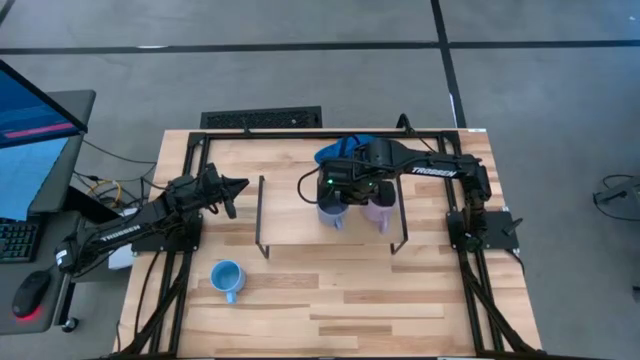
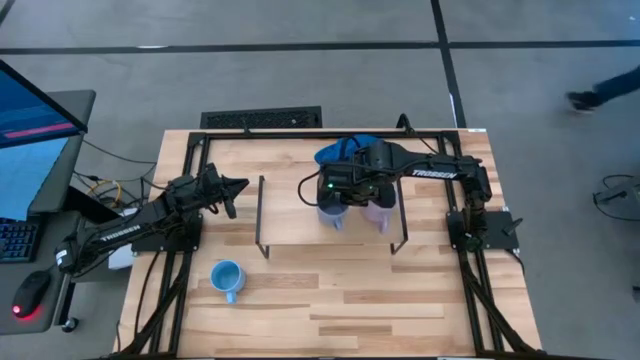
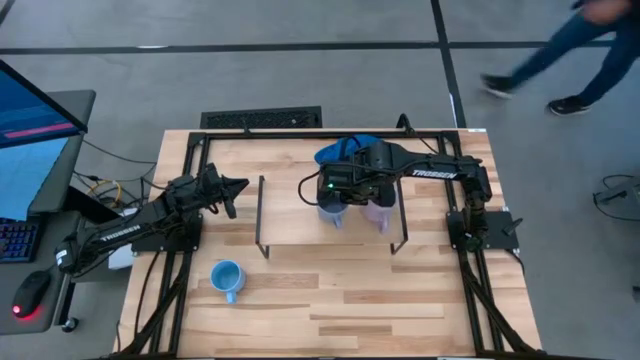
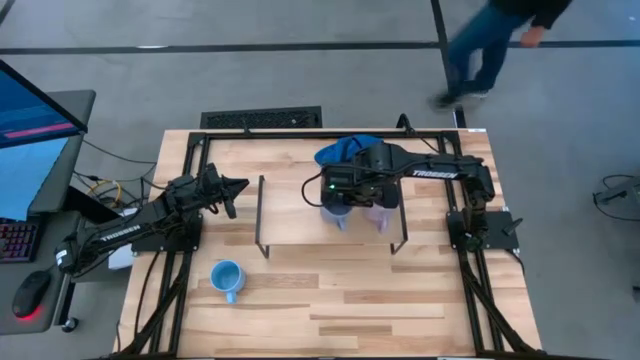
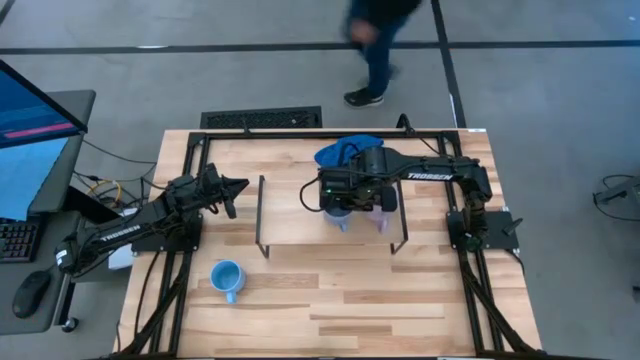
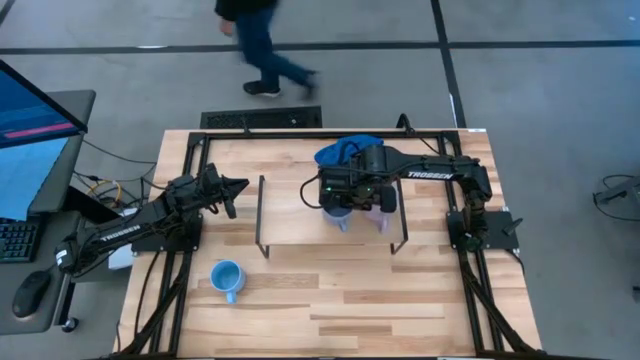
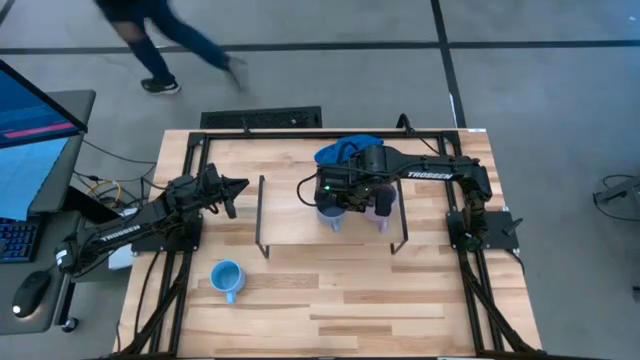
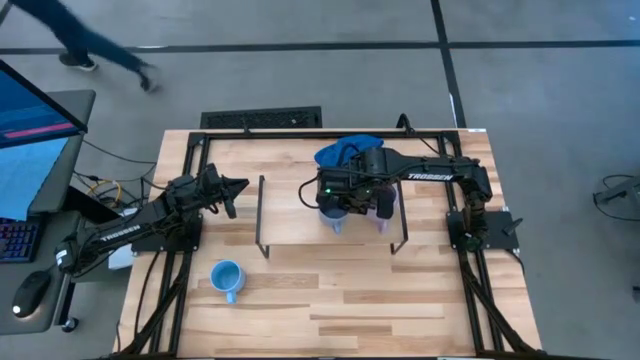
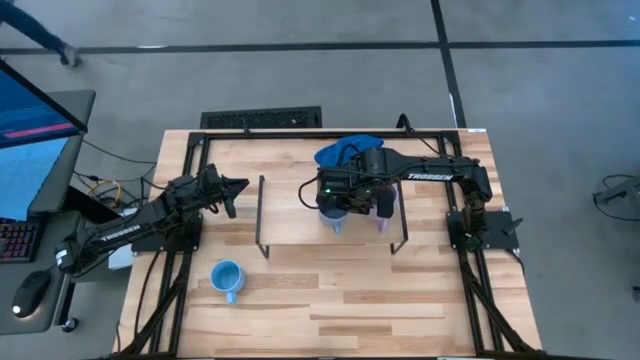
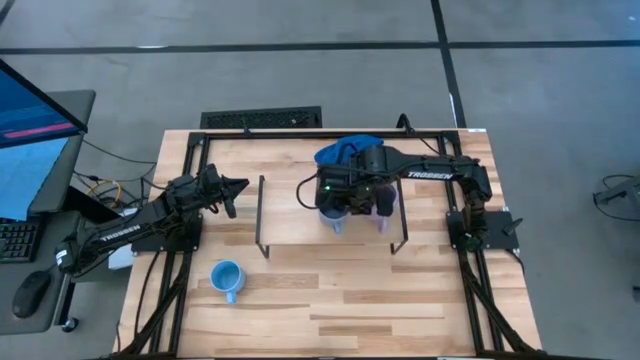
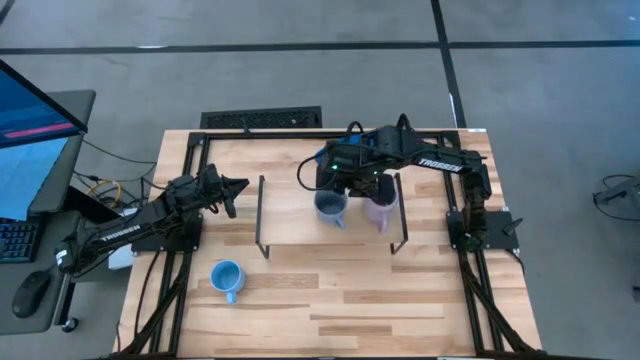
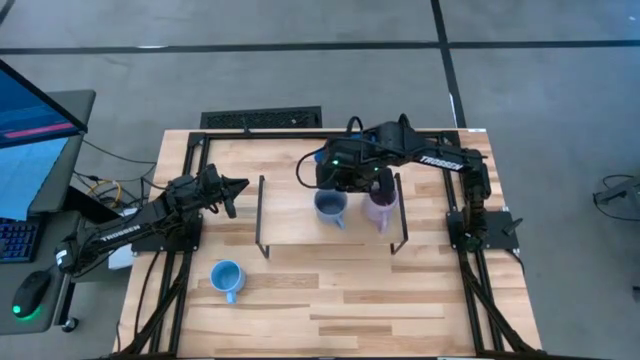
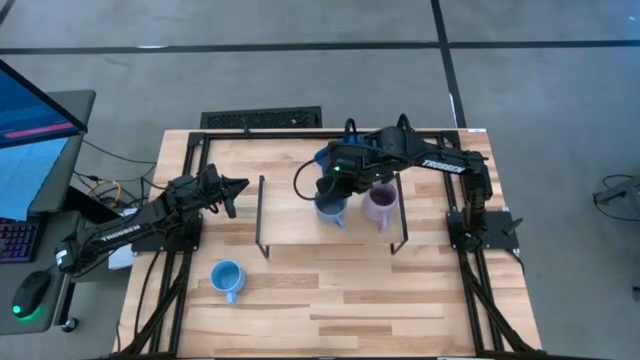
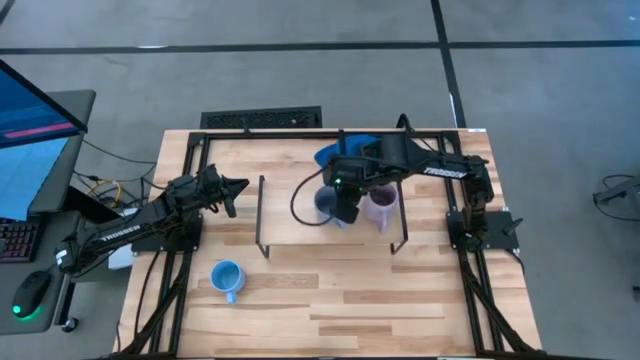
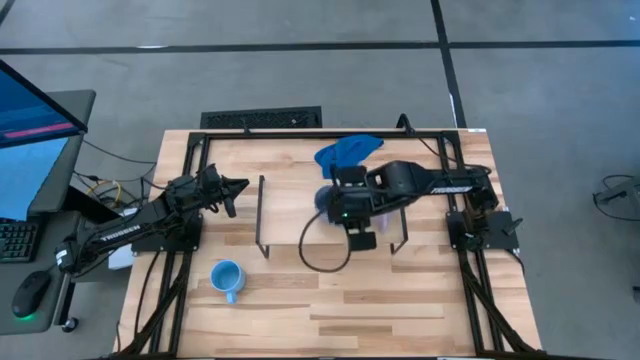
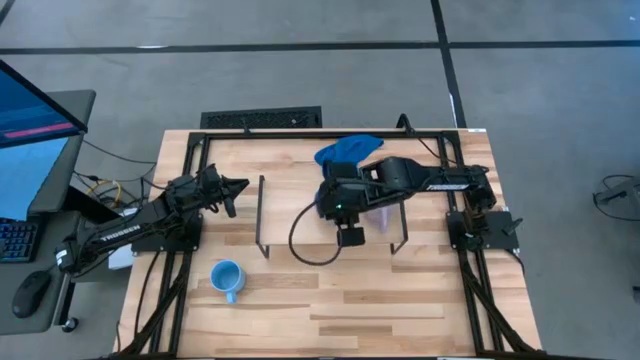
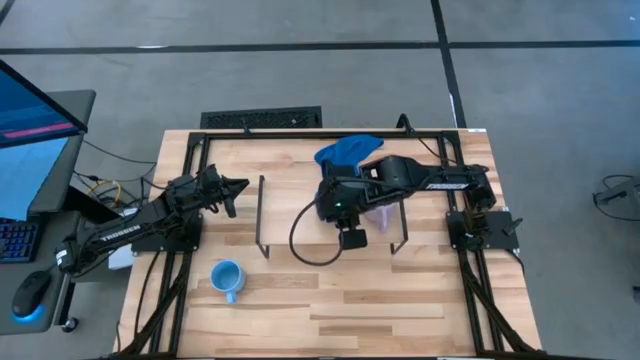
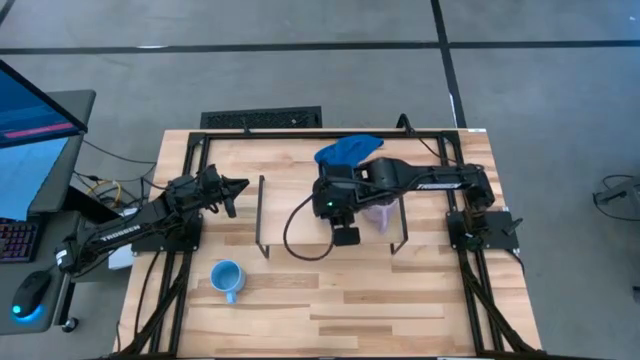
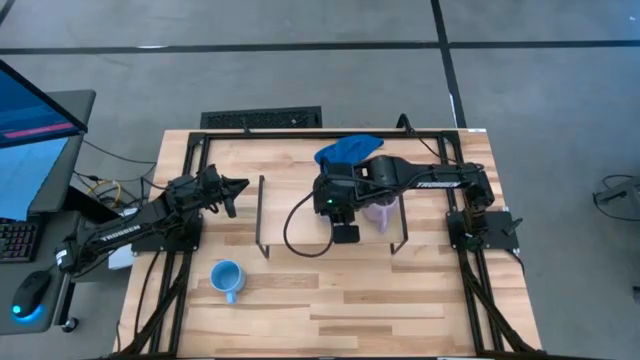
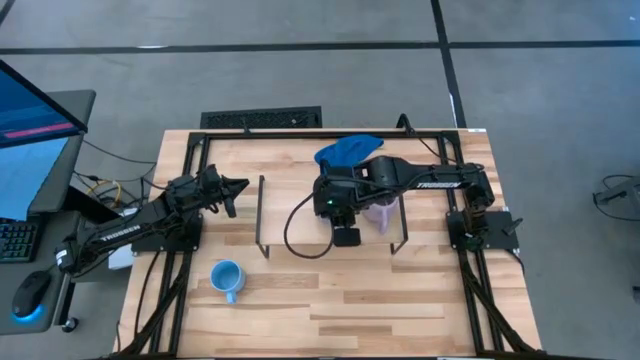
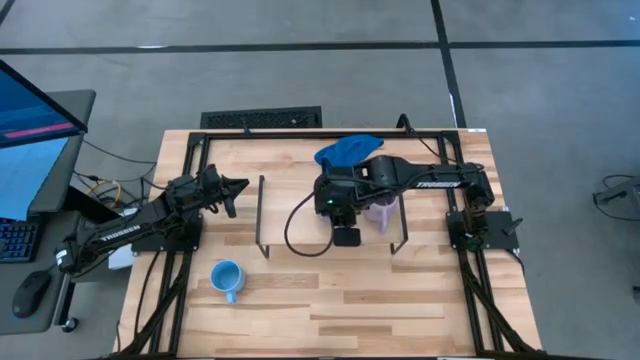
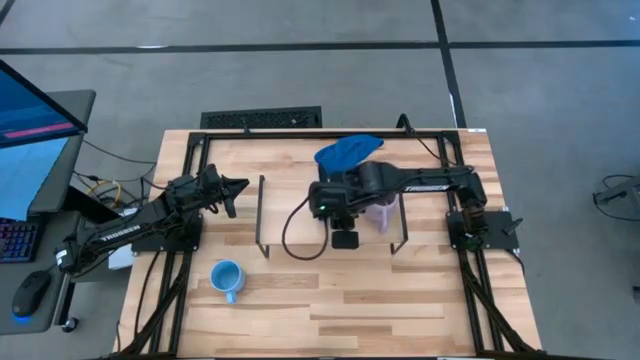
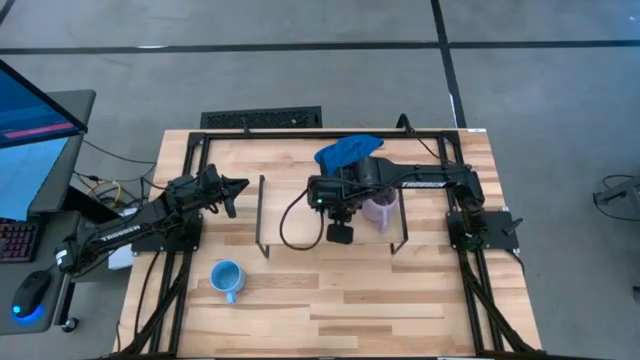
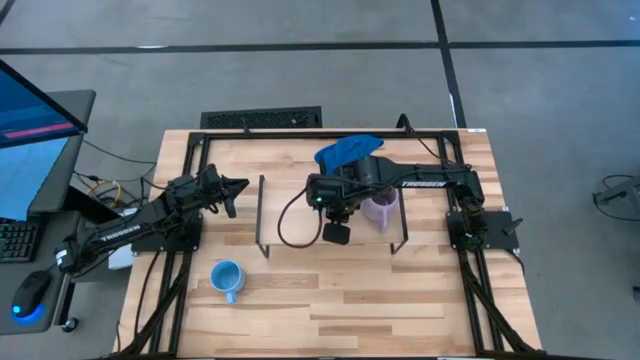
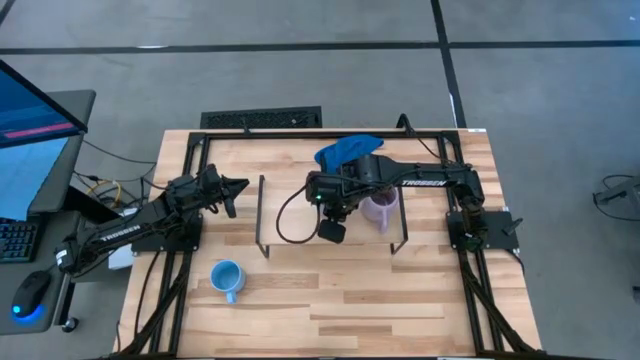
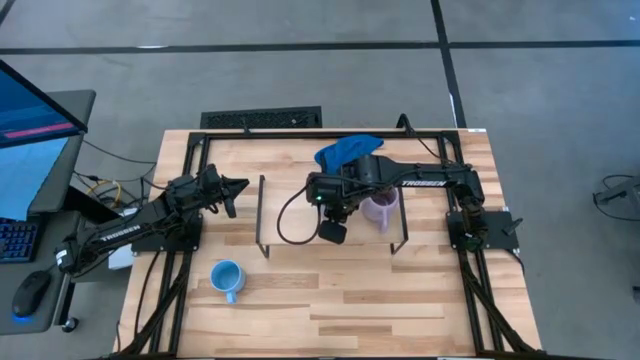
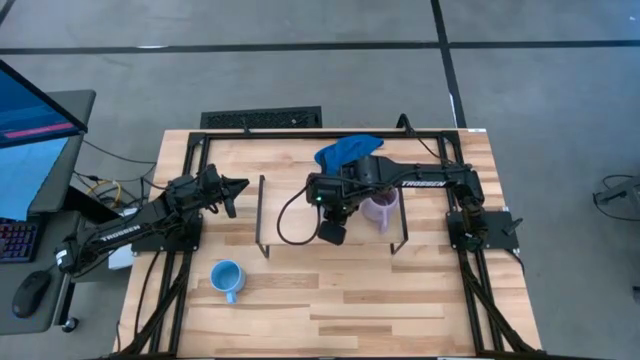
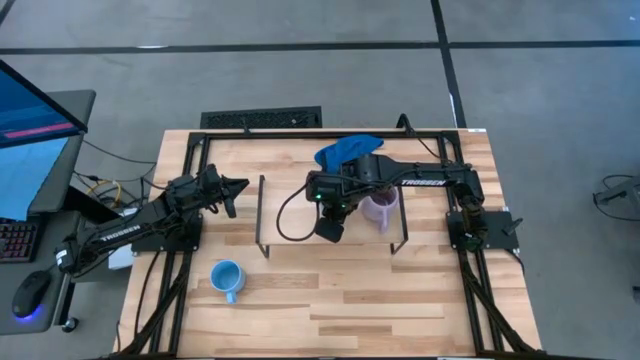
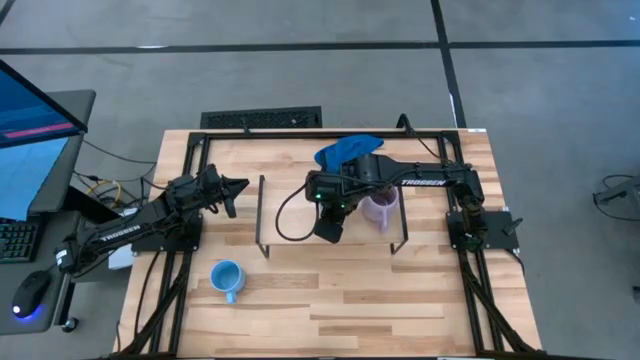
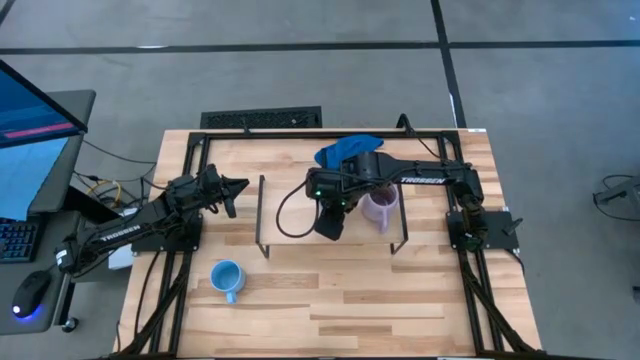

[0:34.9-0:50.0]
Task: Stack small to large cups/mugs on shelf
Put the blue mug on the shelf

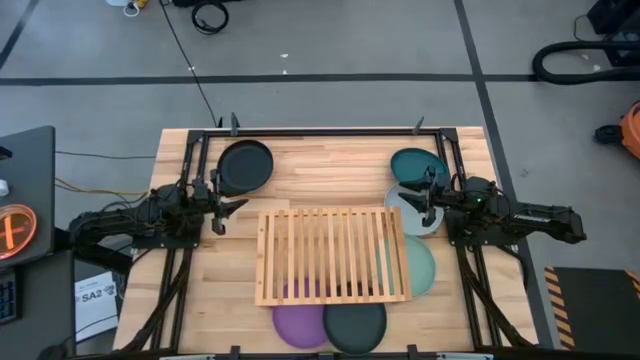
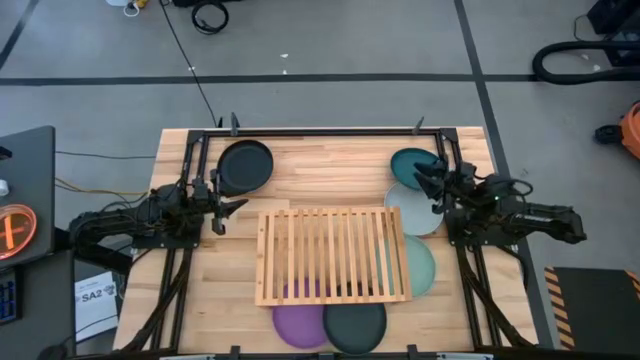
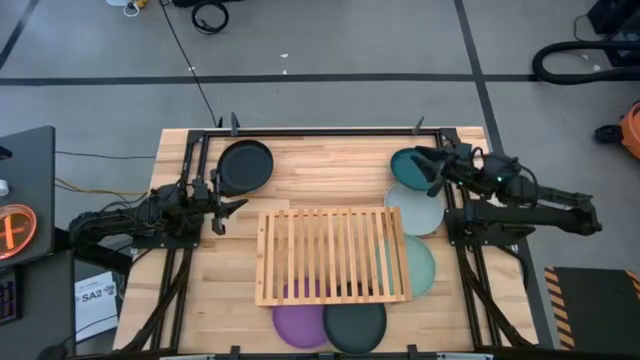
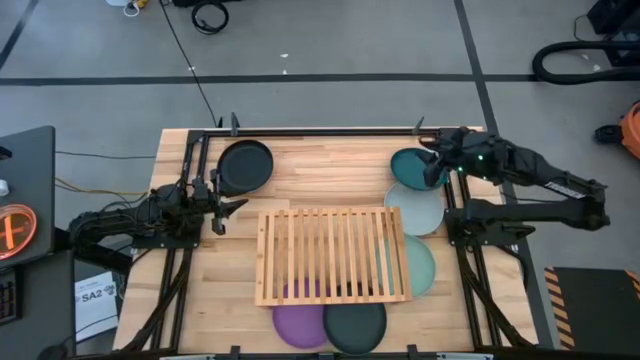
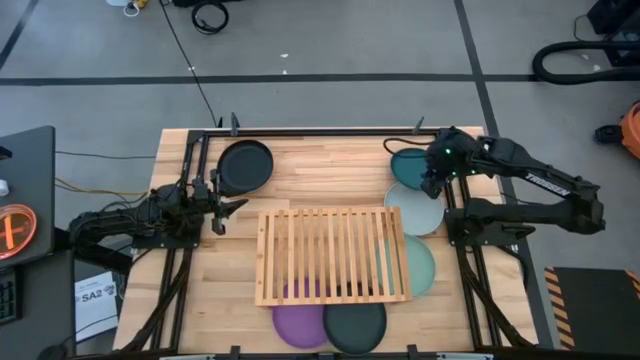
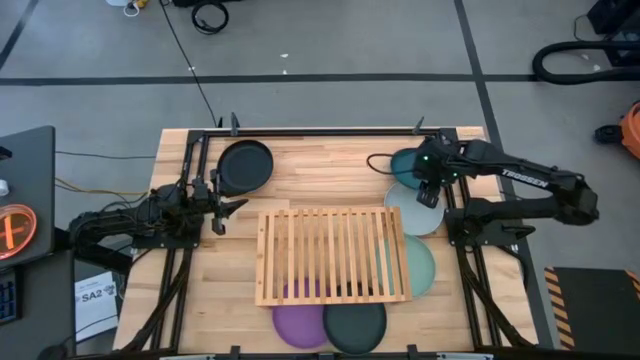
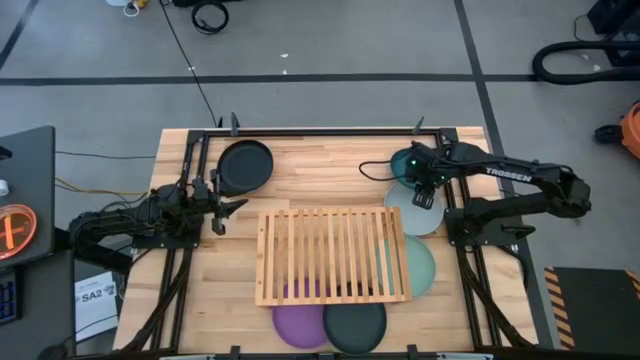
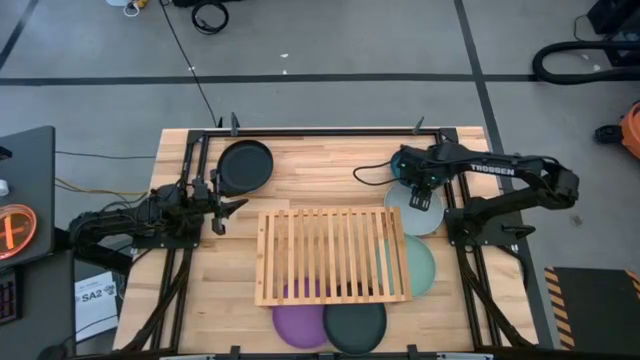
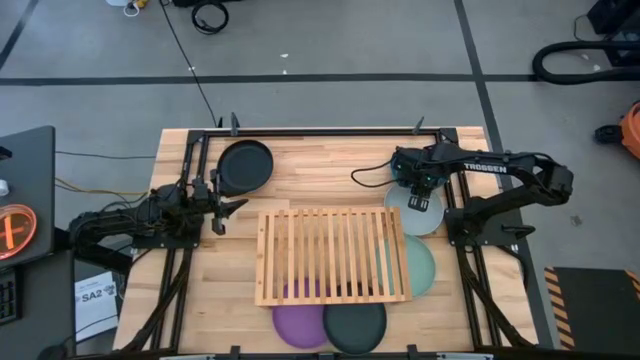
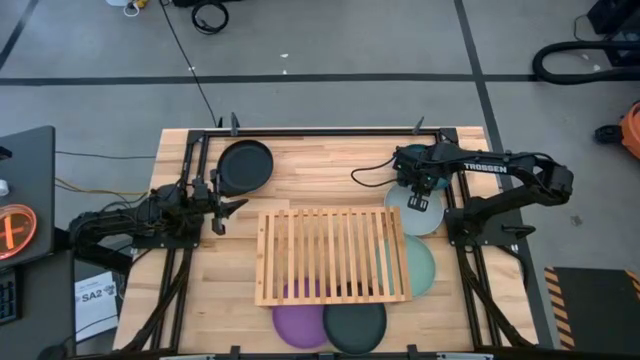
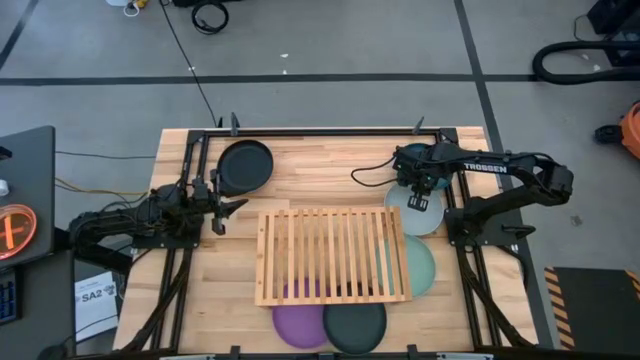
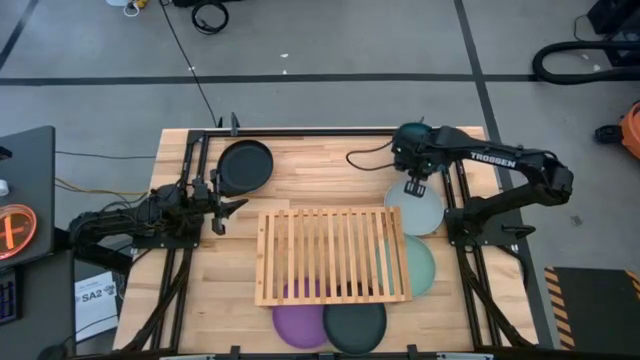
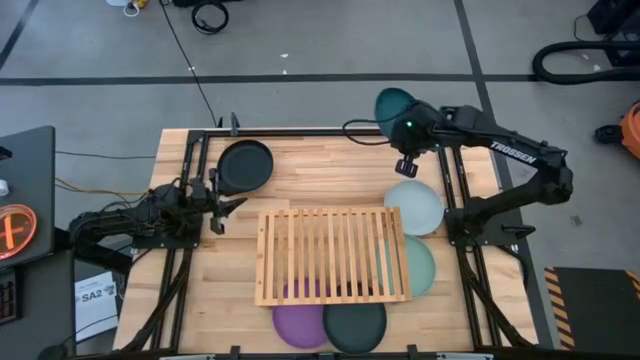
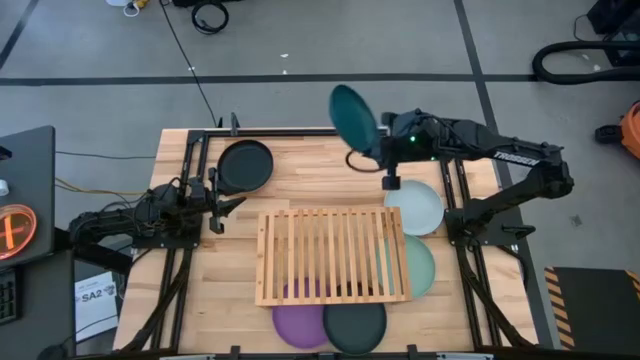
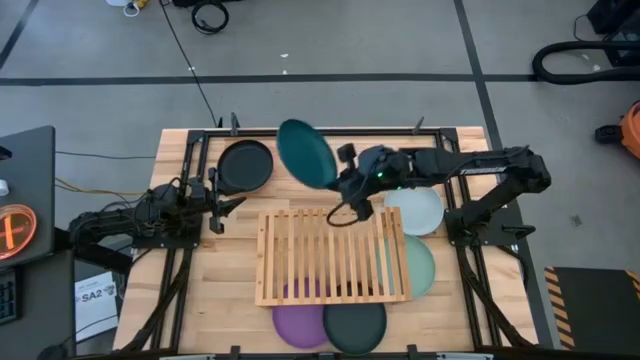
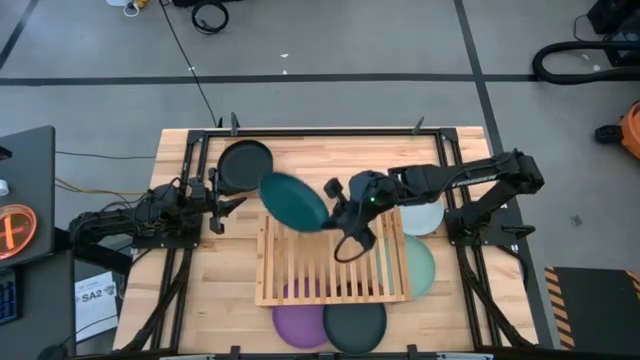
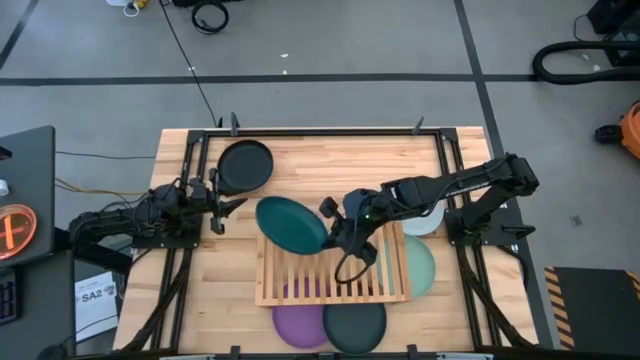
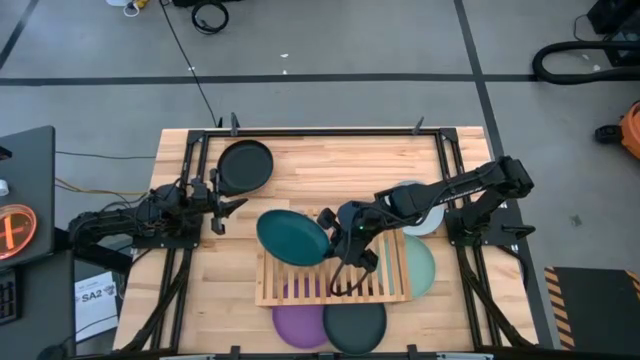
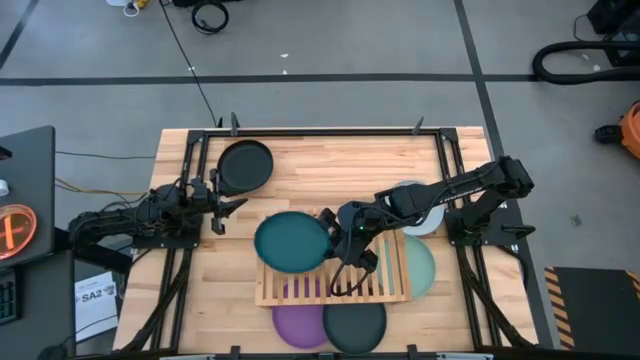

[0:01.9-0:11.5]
Task: Place and stack plates onto a shelf
Put the dark green plate on the shelf
